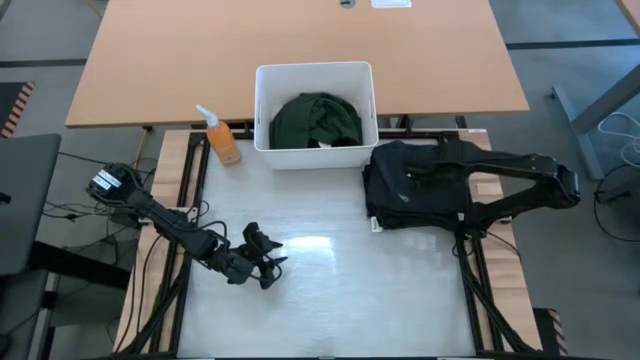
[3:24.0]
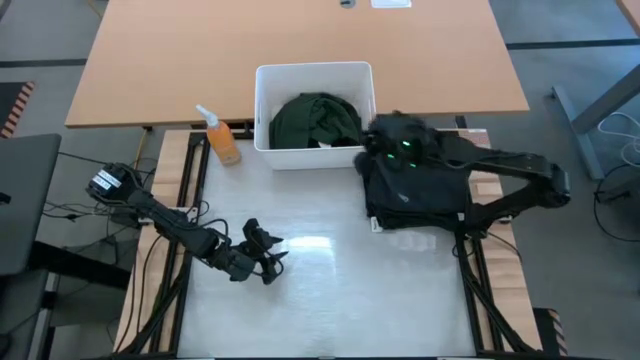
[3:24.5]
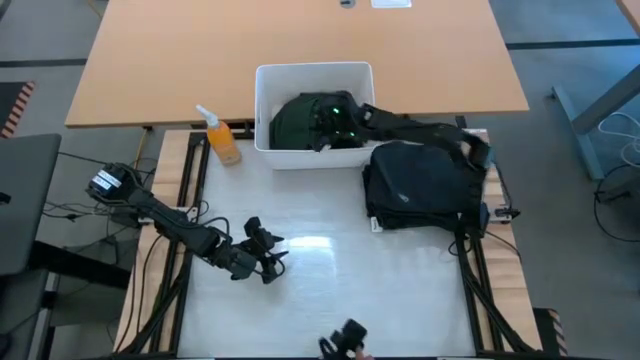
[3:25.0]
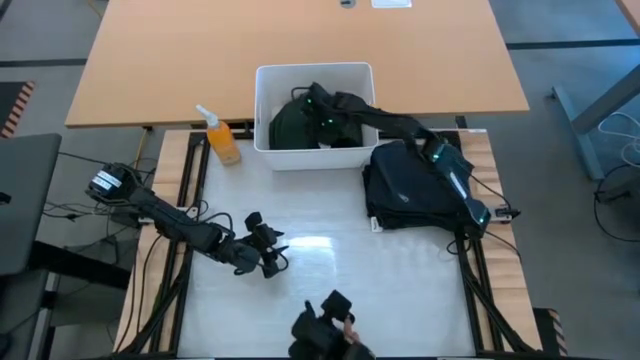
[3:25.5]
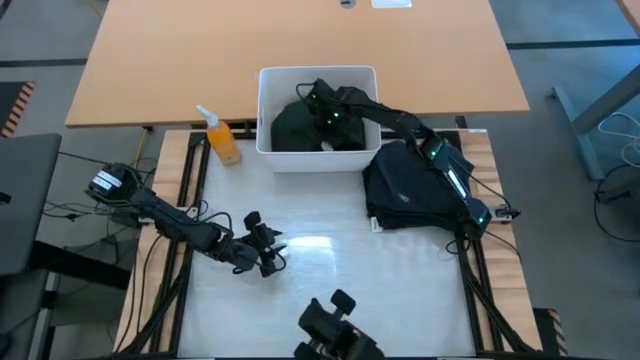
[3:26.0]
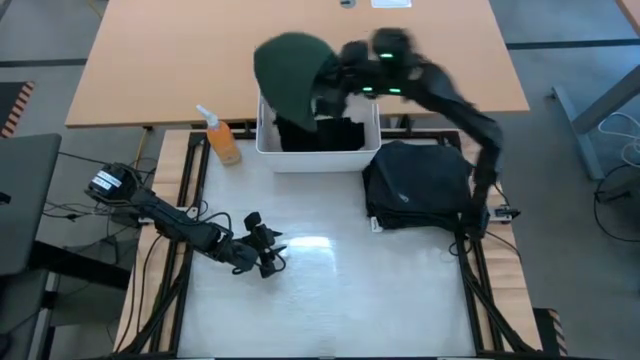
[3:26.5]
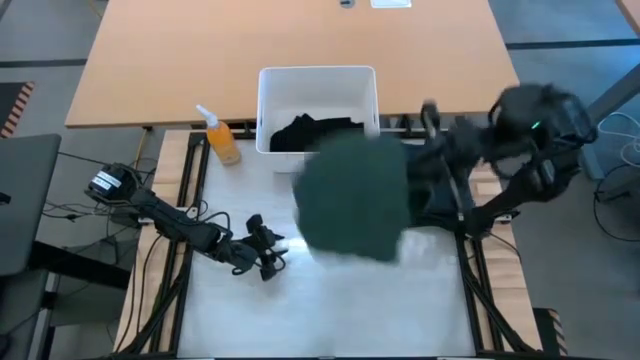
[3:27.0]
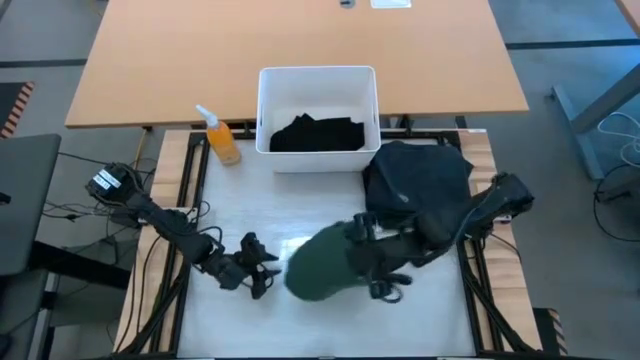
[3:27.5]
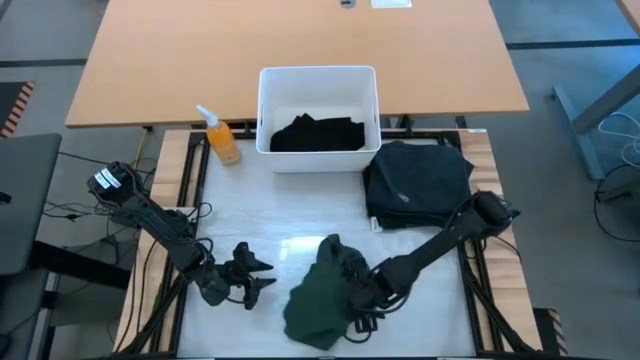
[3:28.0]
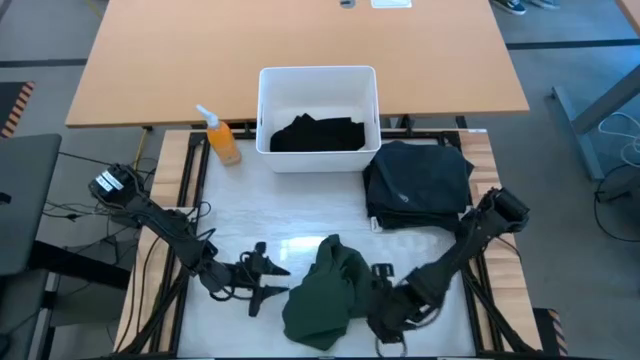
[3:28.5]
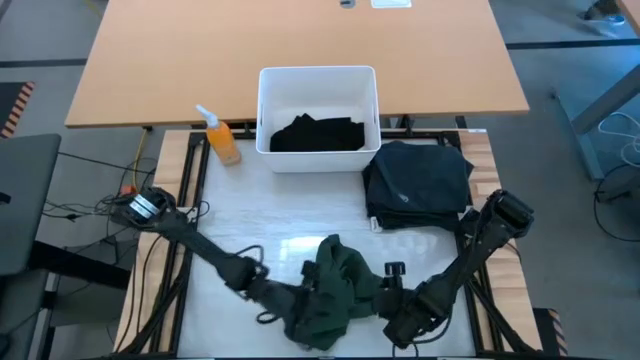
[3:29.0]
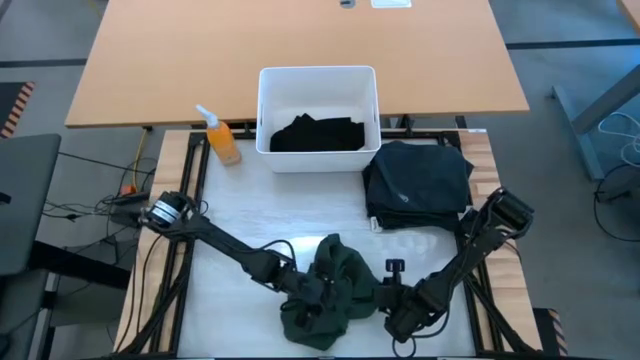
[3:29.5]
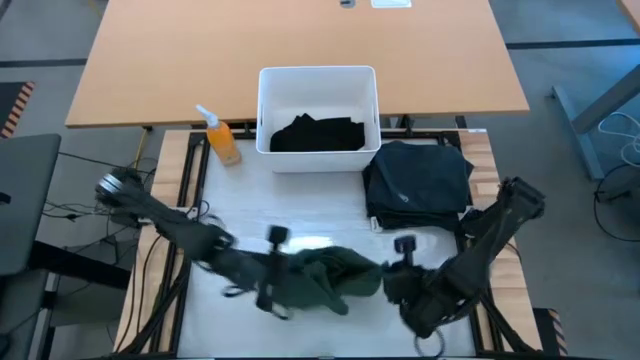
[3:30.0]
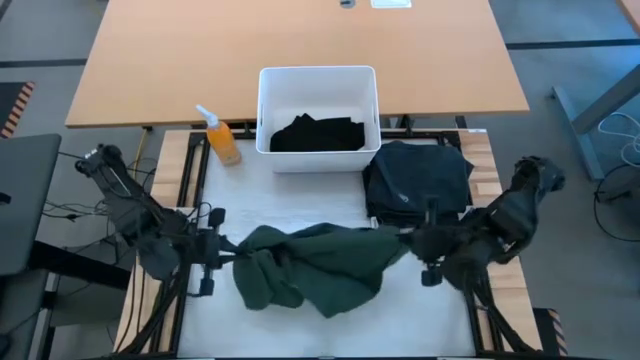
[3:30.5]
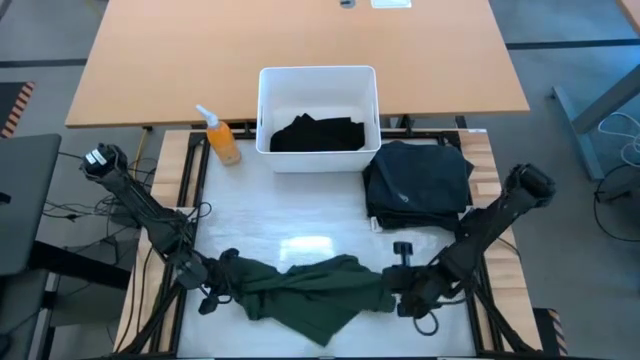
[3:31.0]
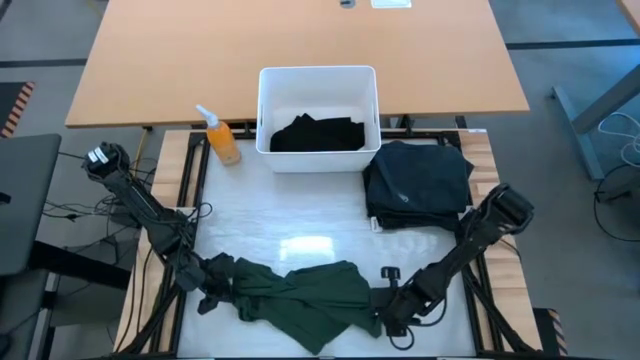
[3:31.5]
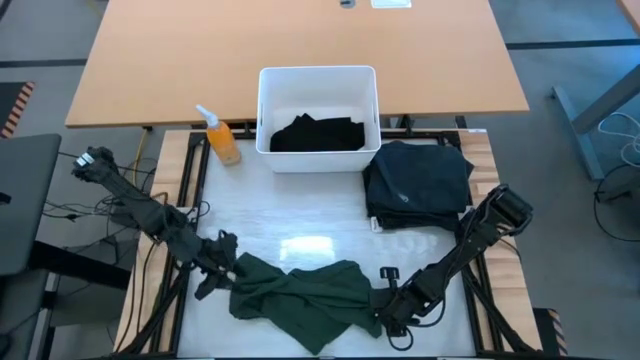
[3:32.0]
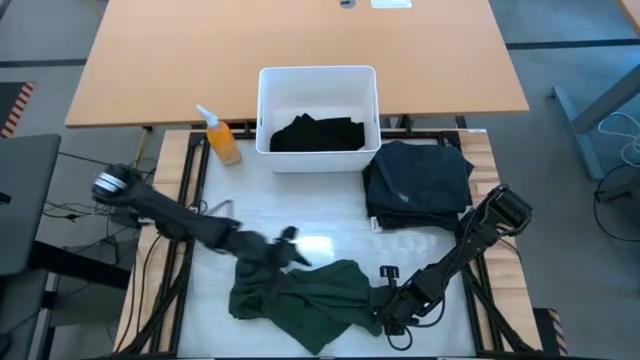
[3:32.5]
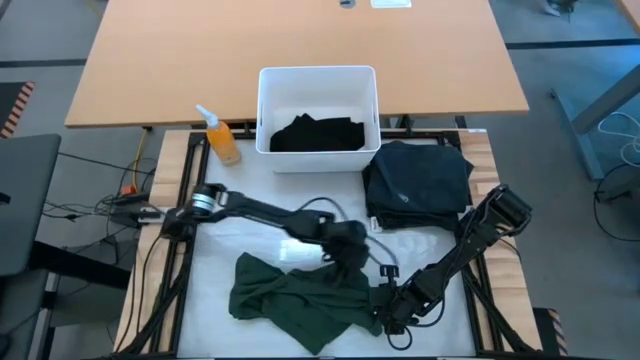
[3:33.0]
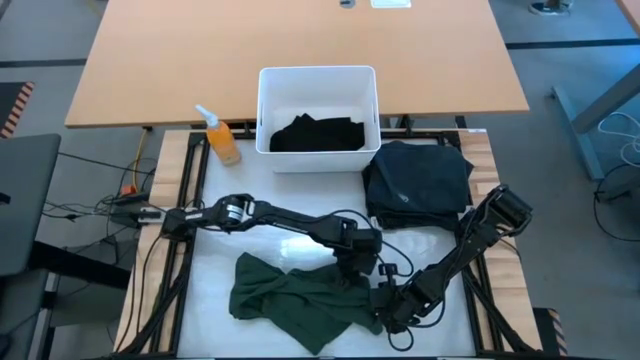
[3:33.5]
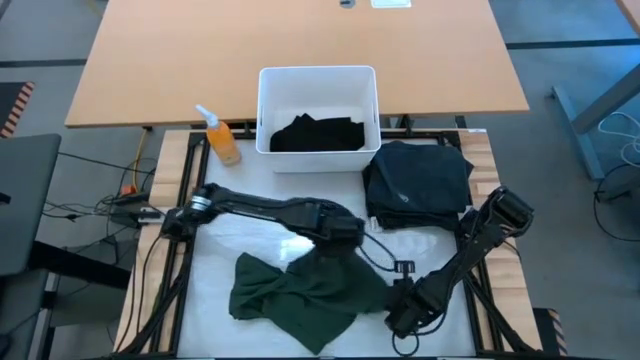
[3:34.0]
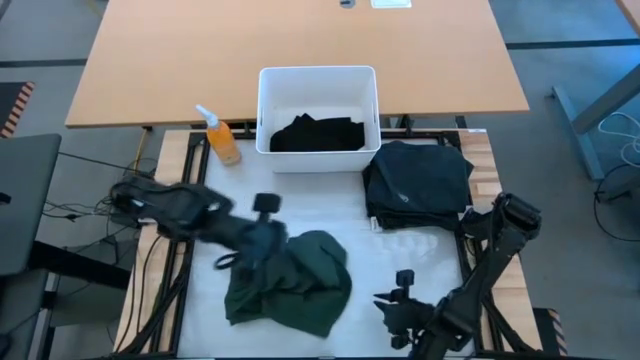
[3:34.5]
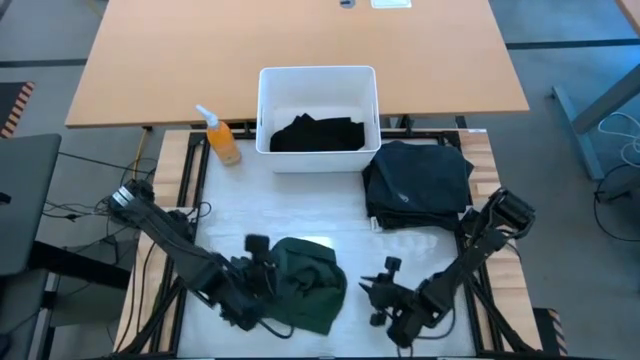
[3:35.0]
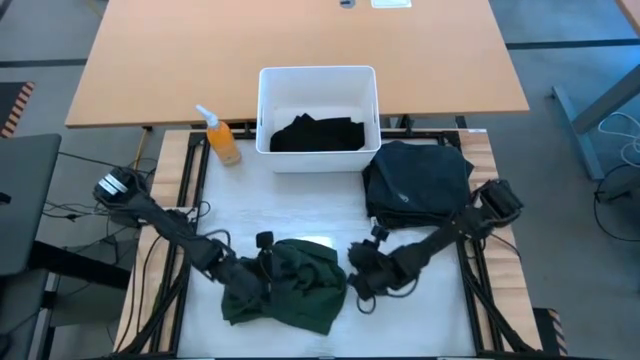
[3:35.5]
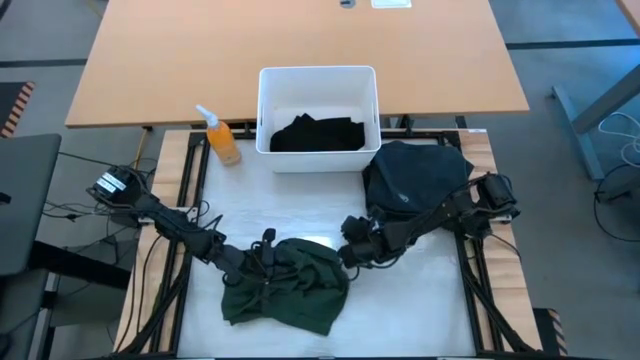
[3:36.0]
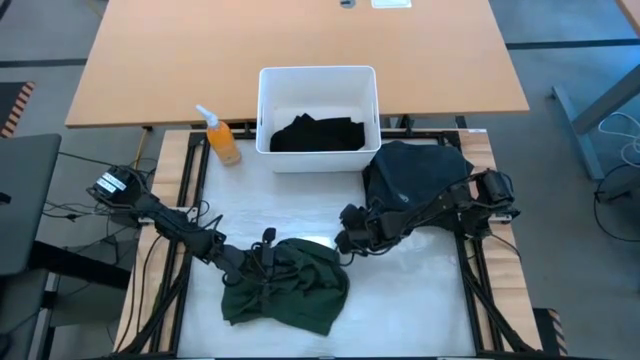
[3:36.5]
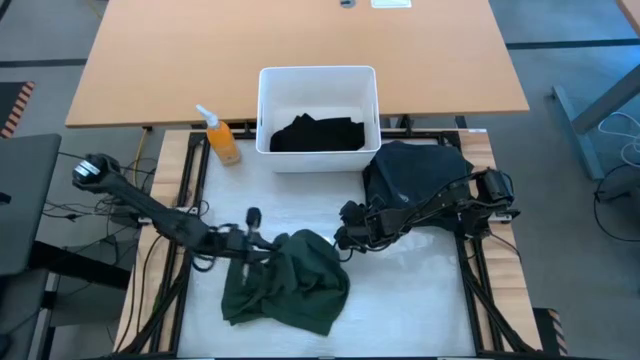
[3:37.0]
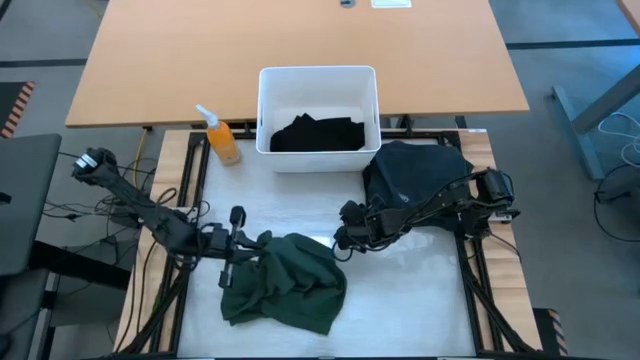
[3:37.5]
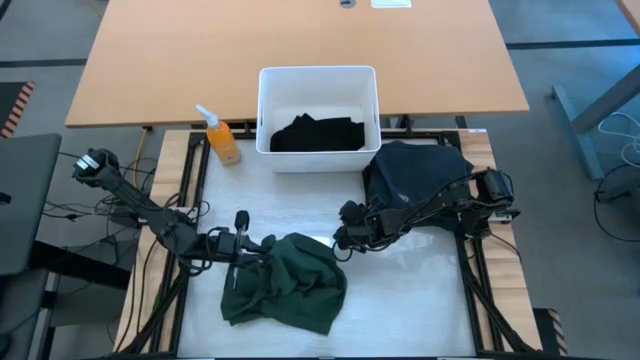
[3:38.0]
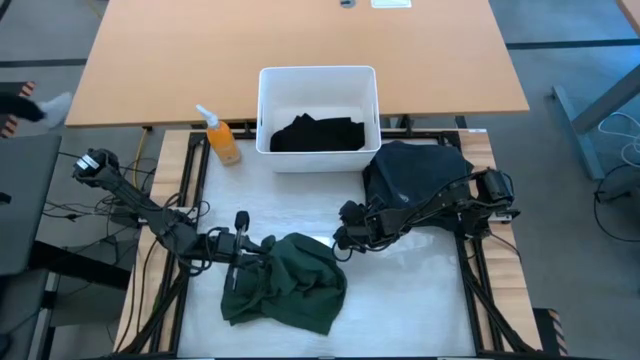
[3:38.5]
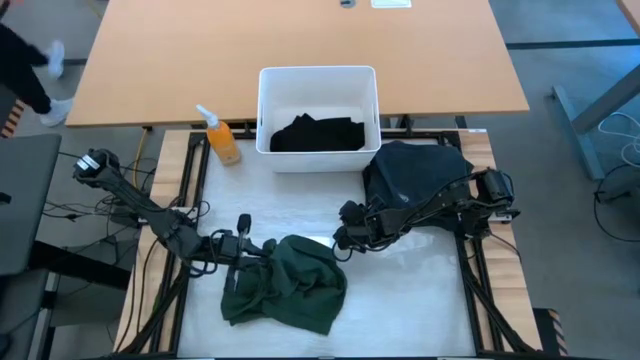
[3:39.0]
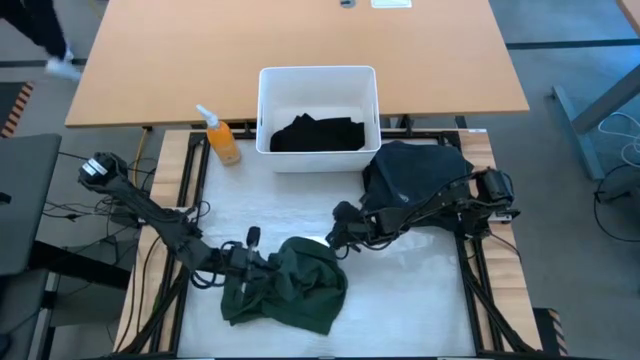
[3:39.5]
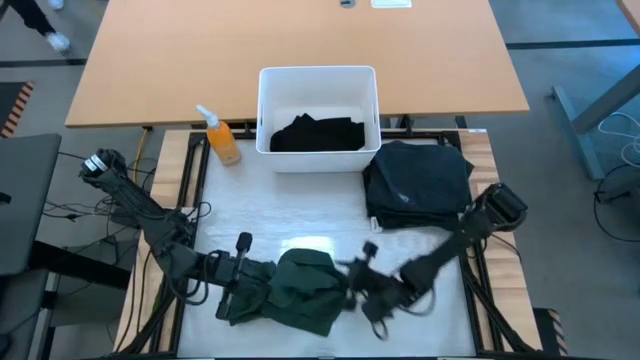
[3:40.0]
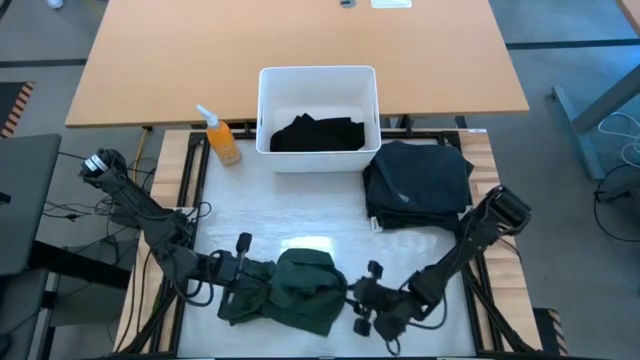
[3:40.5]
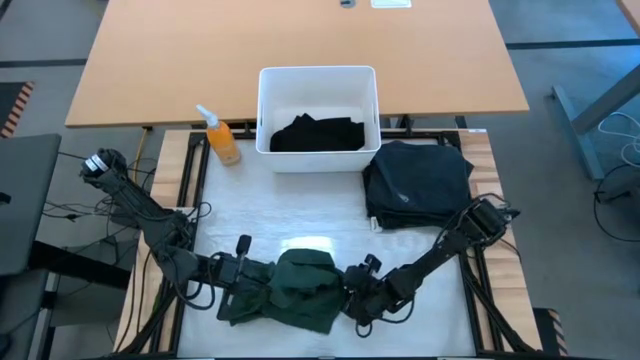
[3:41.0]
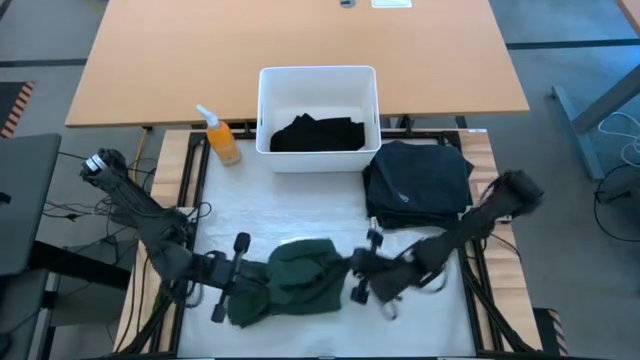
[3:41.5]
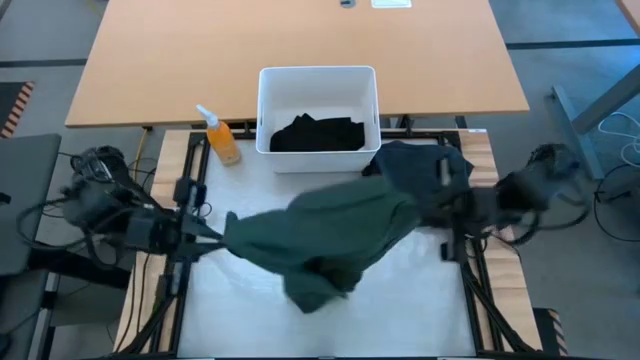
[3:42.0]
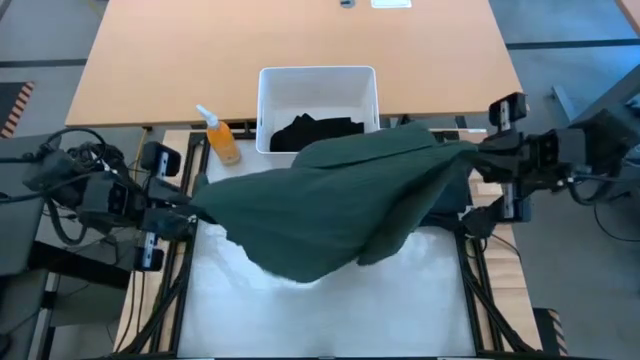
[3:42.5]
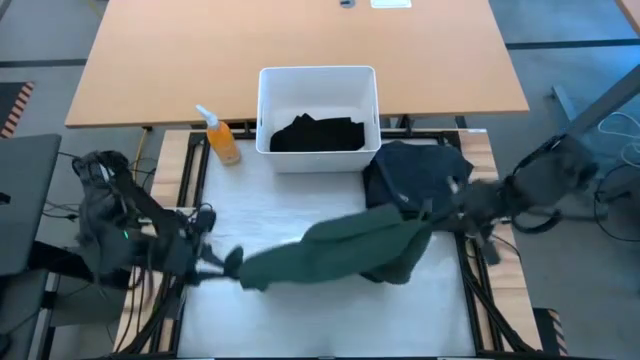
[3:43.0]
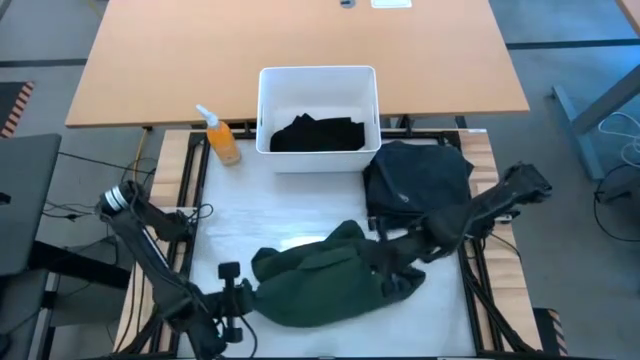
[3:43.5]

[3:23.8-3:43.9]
Task: Fold laundry
Fold the green polo shirt from the white laundry organizer

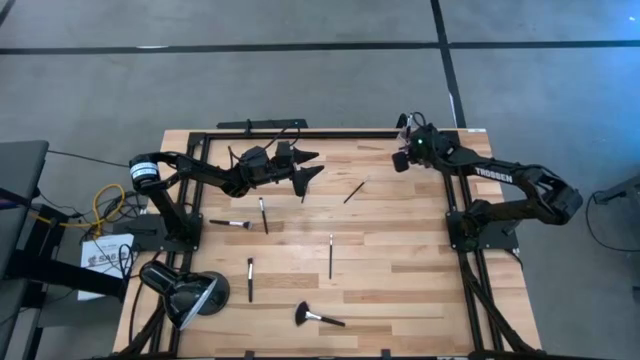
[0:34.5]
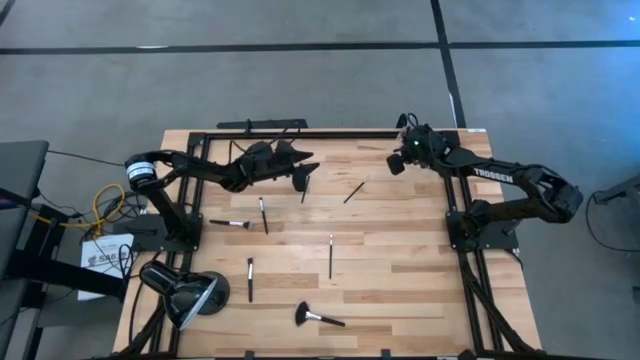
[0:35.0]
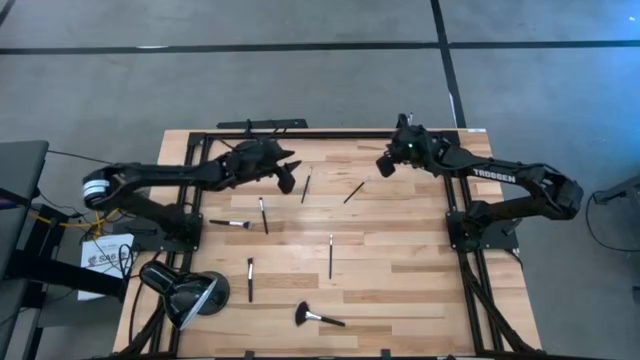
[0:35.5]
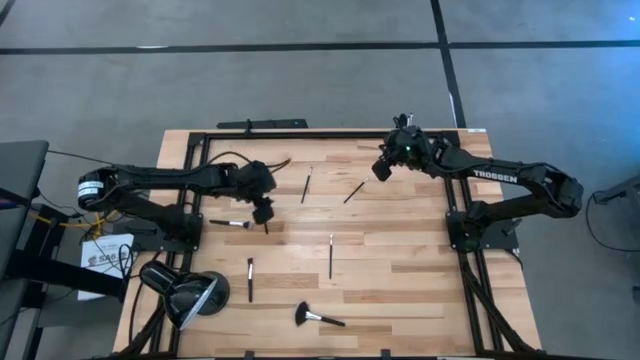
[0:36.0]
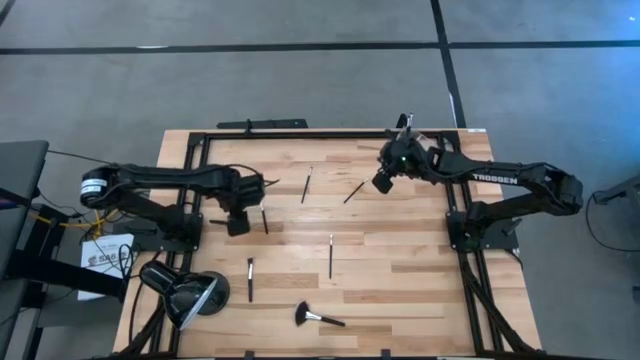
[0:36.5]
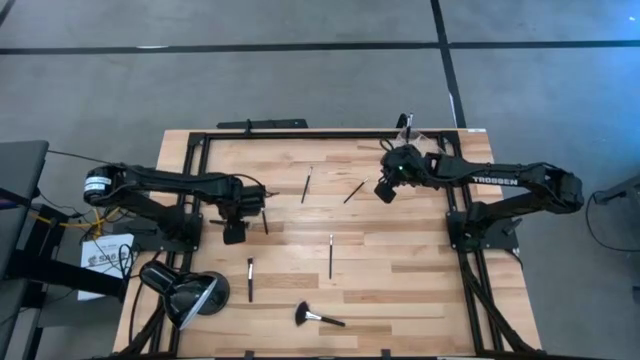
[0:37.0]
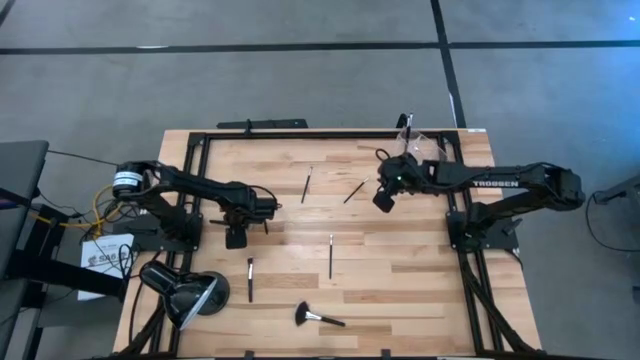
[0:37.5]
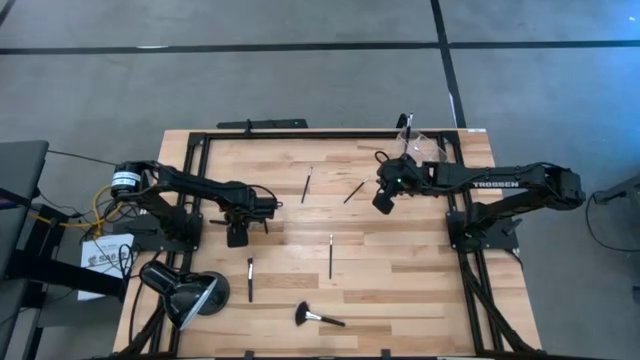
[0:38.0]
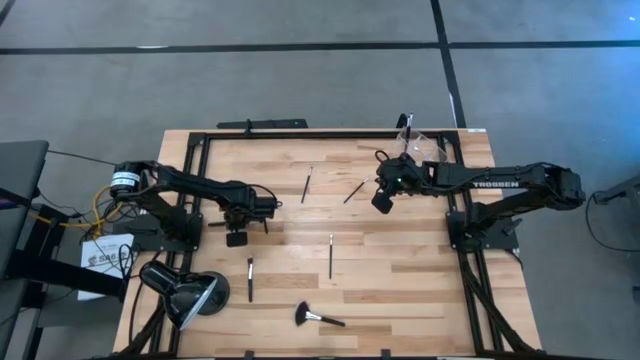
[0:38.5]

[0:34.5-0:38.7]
Task: Put items in baskets/containers
Put the black powder brush into the transparent organizer
